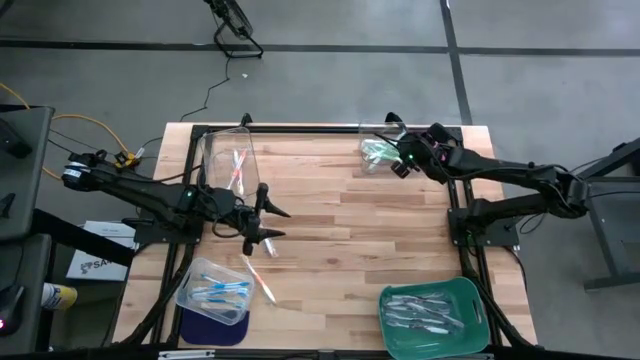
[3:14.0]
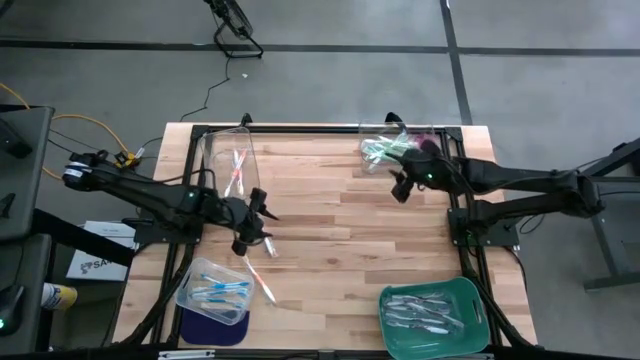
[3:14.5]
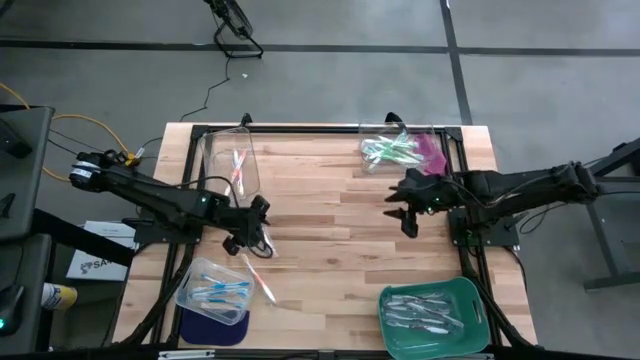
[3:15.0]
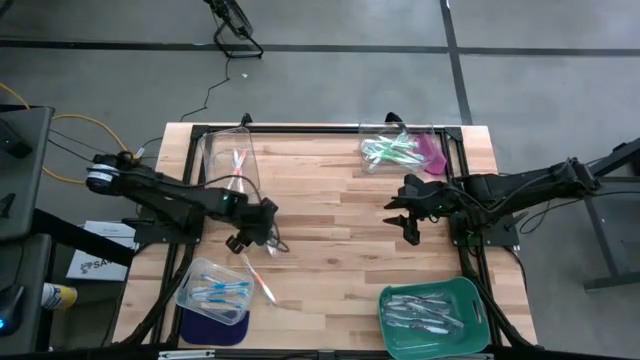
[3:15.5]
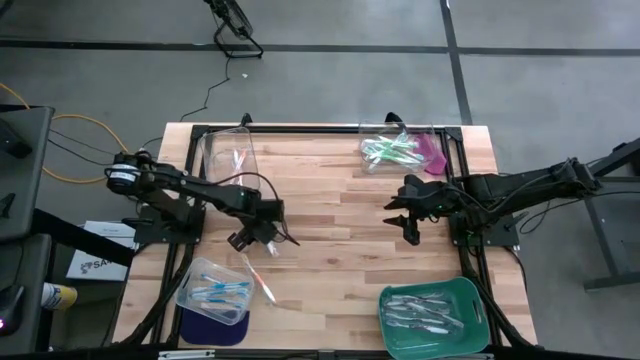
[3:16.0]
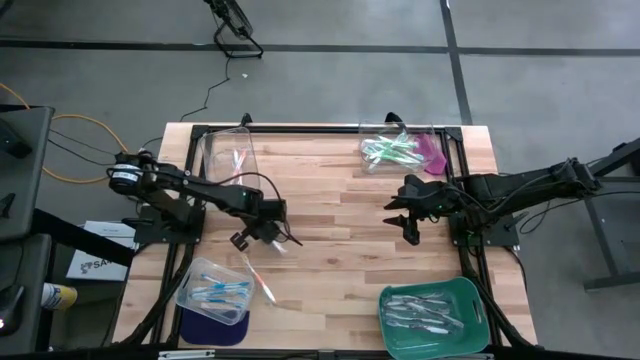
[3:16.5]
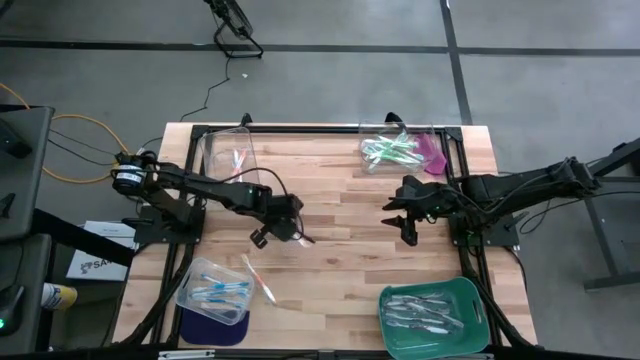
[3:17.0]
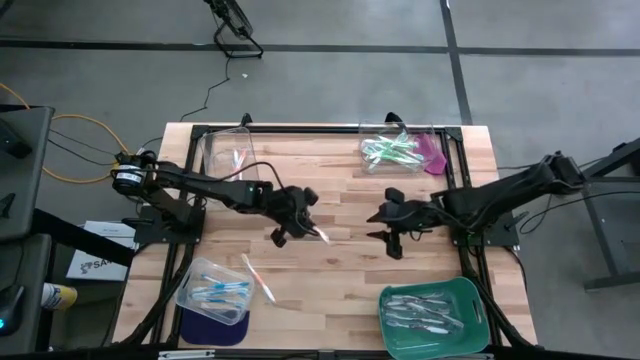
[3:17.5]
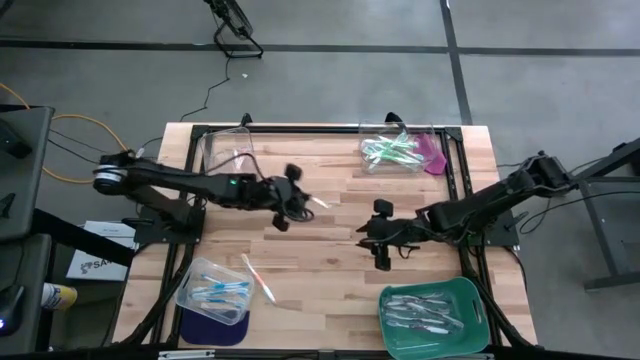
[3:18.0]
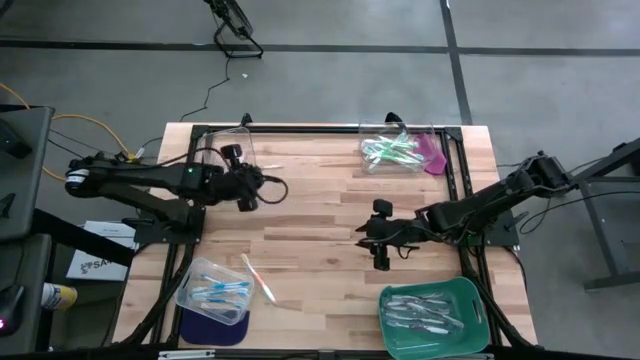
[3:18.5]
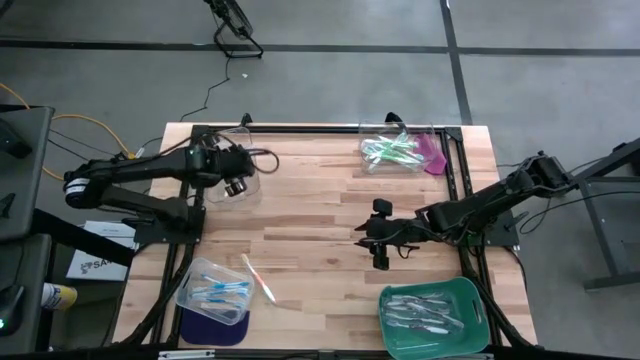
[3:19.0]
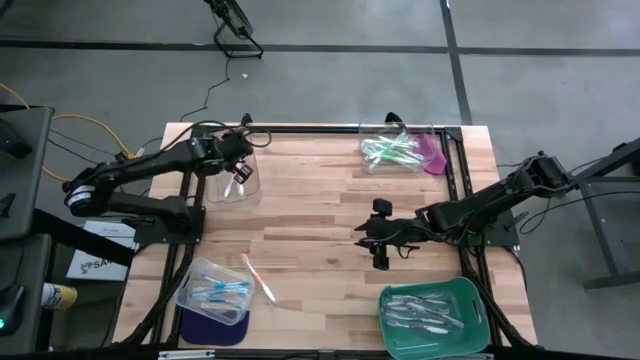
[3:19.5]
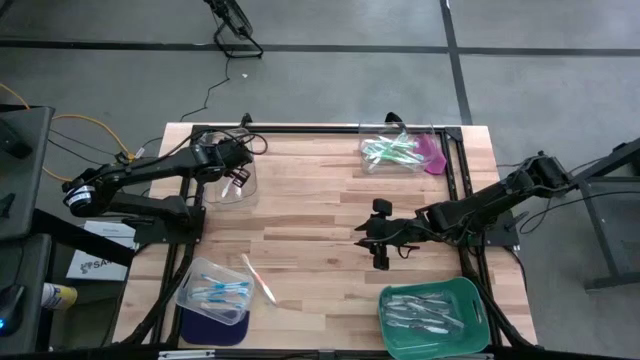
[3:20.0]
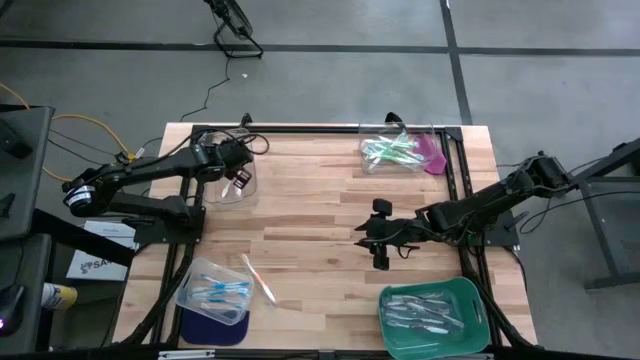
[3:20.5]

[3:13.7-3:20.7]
Task: Pick & Place Toothbrushes
Put the orange toothbrush into the top left transparent bin

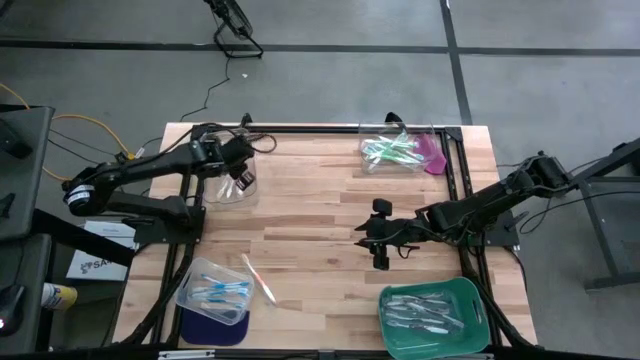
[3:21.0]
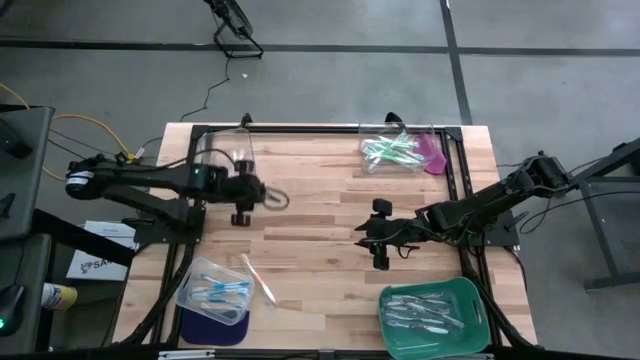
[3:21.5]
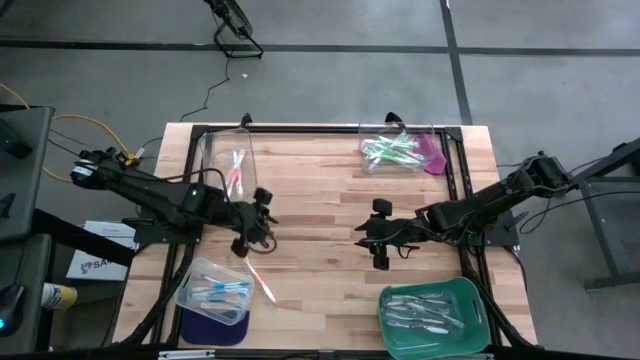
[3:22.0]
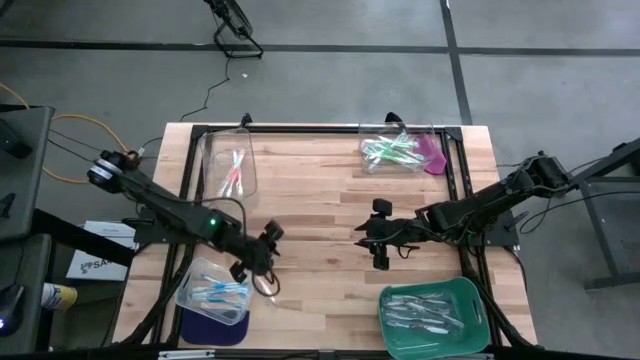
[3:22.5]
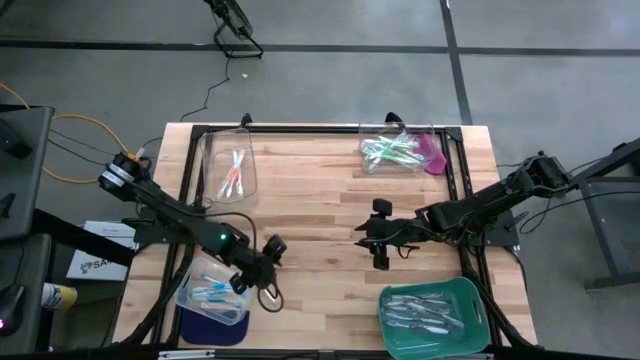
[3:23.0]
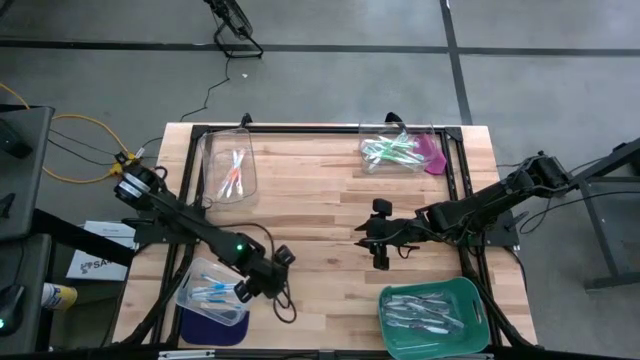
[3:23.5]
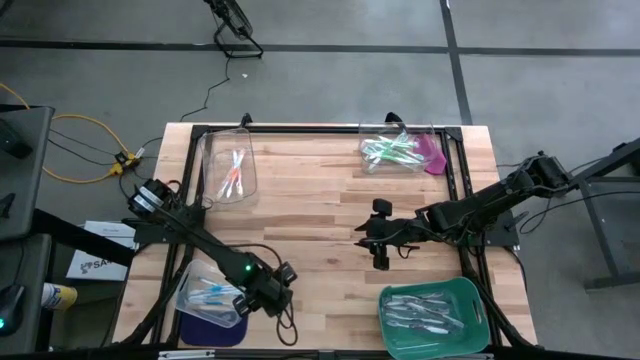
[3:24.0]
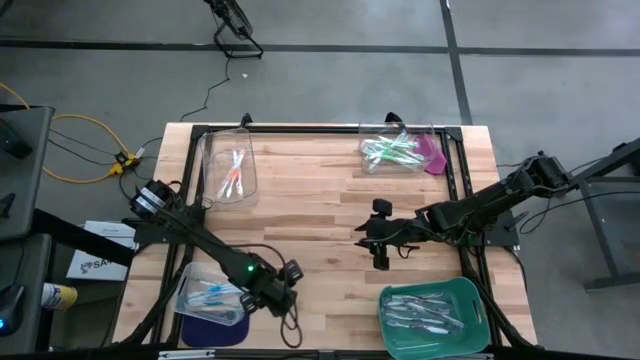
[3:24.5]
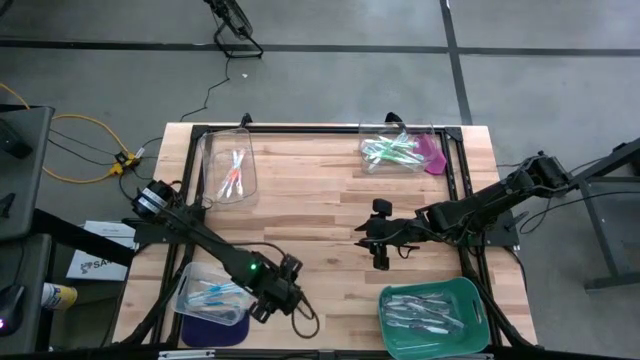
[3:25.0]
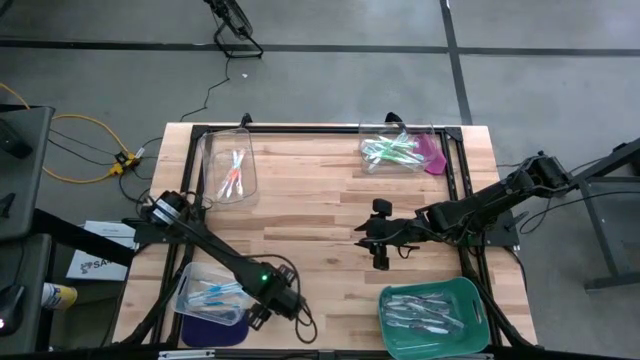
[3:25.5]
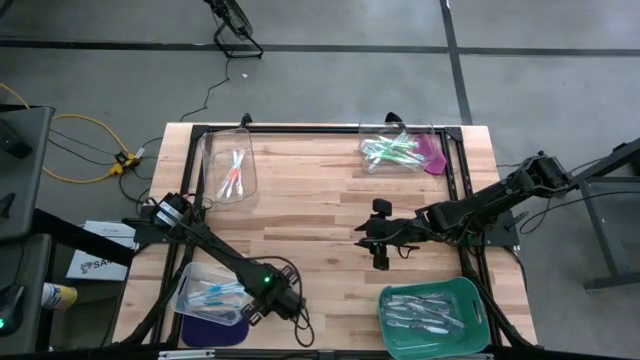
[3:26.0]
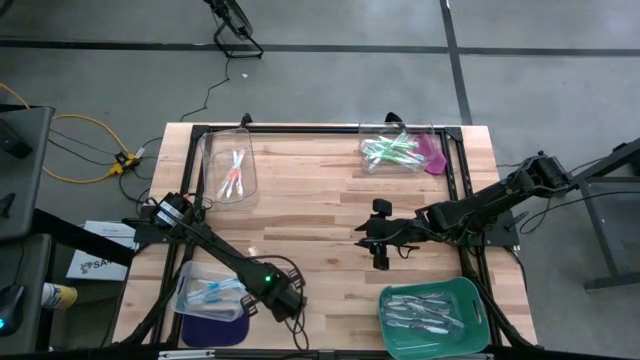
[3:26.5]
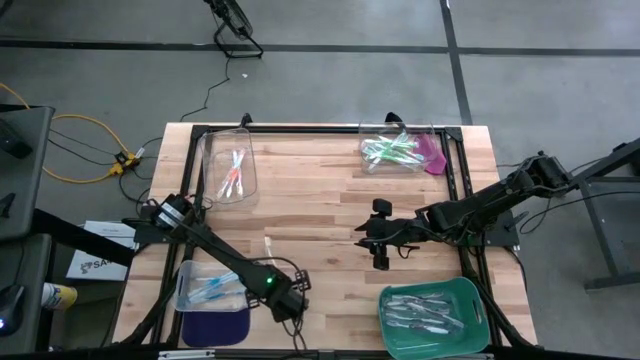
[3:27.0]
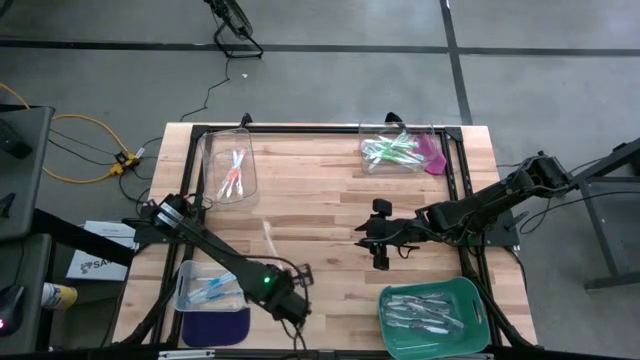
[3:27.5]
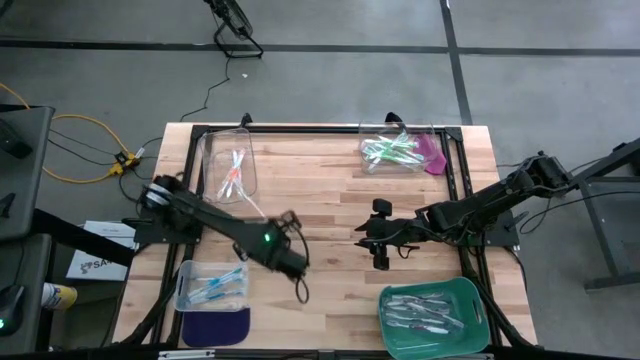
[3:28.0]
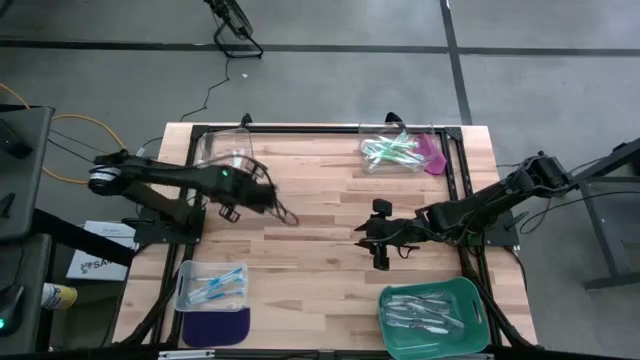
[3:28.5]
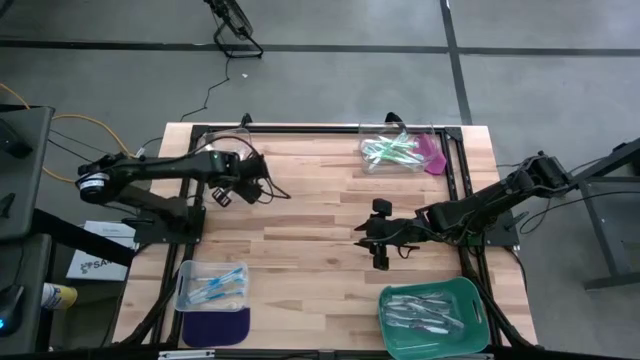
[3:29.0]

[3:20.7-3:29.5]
Put the orange toothbrush into the top left transparent bin

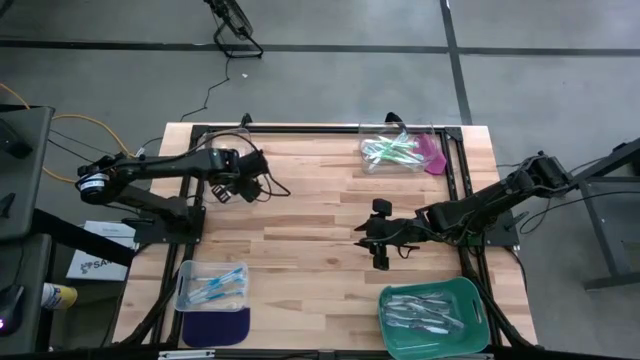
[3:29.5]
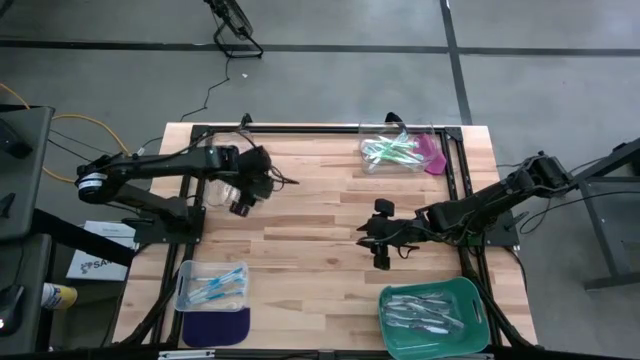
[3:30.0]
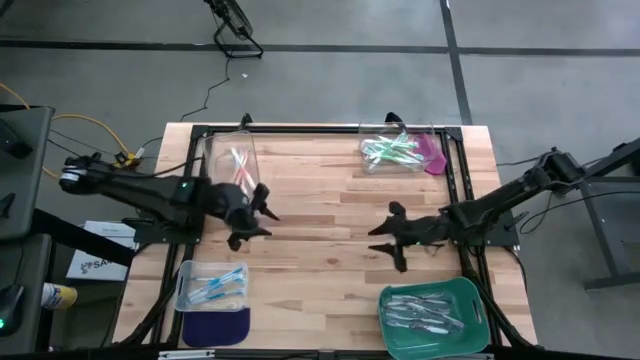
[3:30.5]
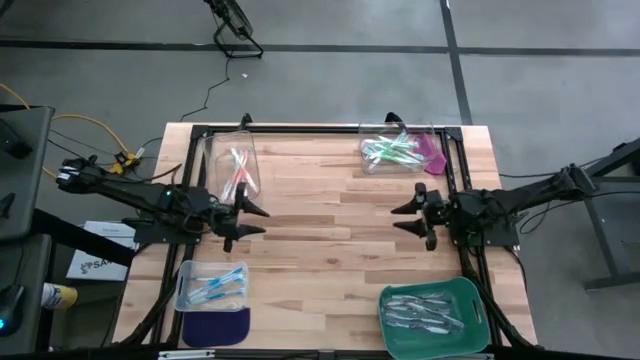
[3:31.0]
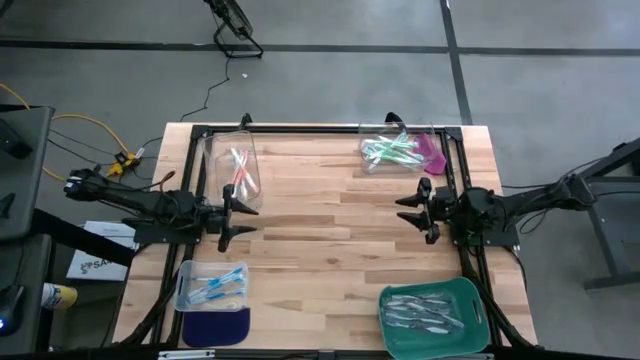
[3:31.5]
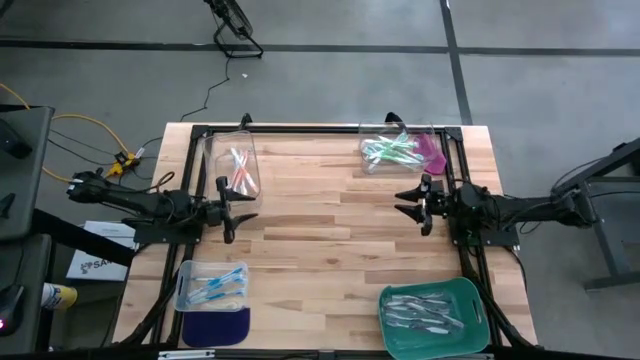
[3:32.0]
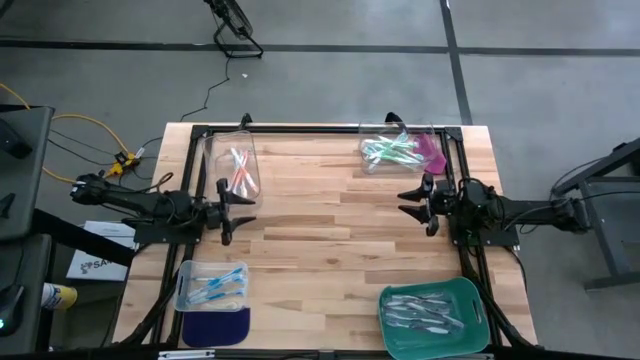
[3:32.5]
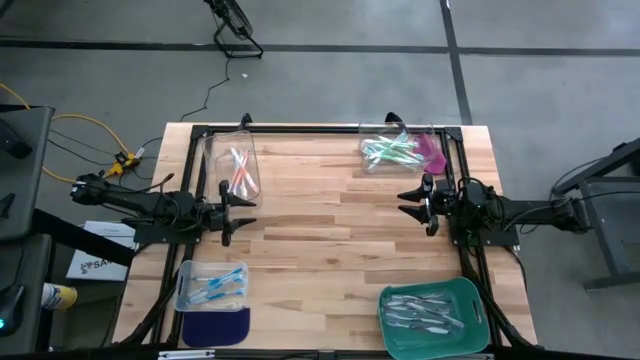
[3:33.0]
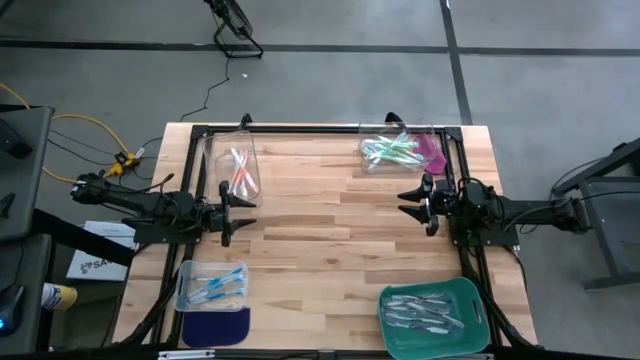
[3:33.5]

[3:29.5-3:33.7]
Return to Home Position
